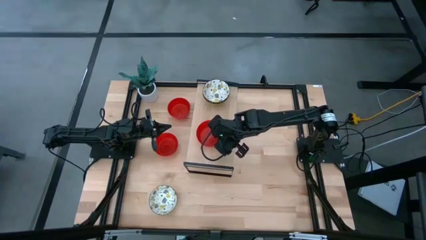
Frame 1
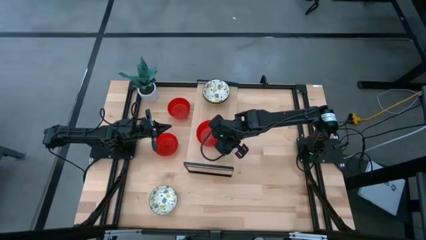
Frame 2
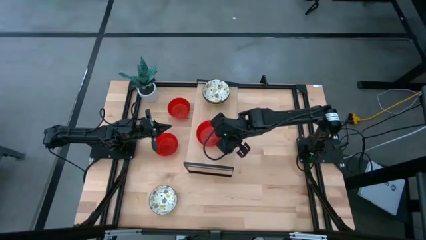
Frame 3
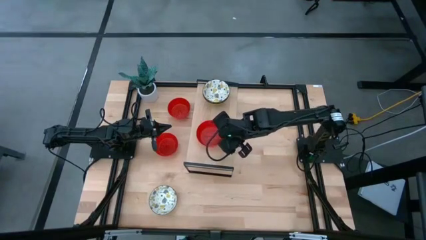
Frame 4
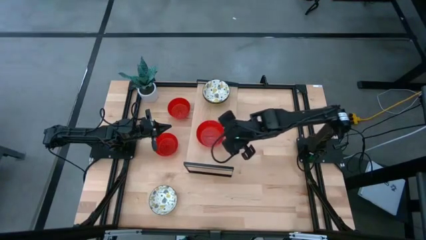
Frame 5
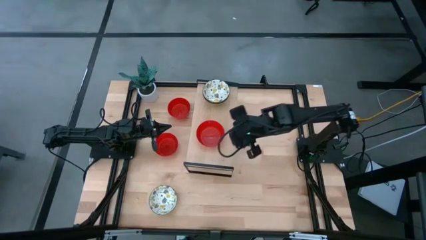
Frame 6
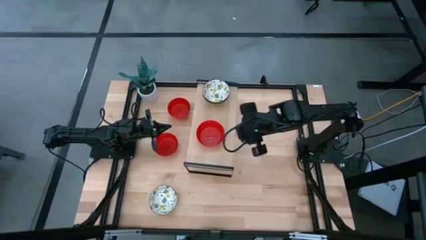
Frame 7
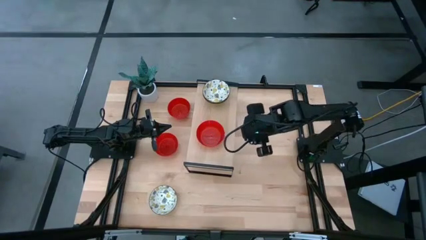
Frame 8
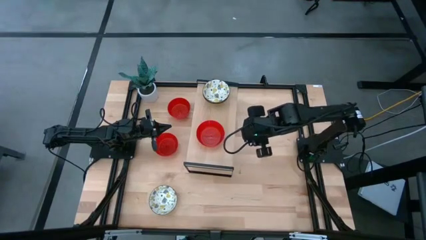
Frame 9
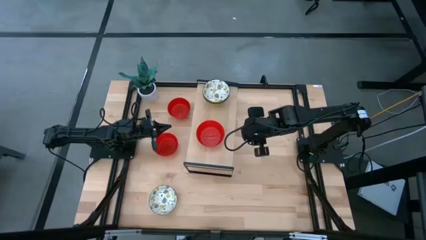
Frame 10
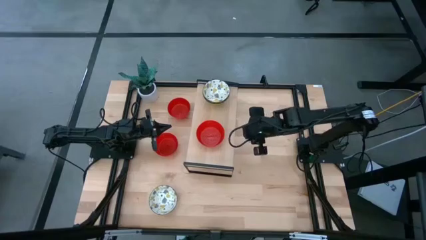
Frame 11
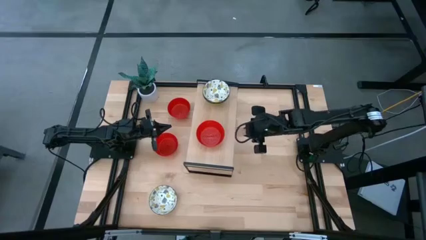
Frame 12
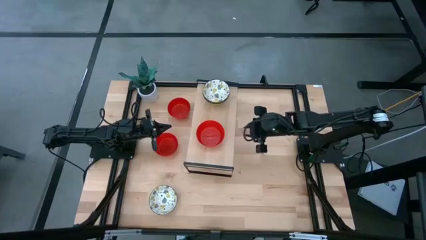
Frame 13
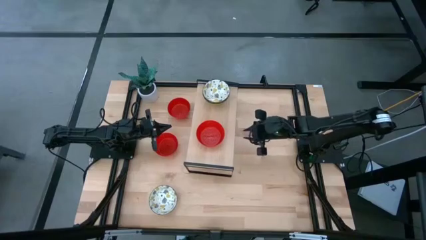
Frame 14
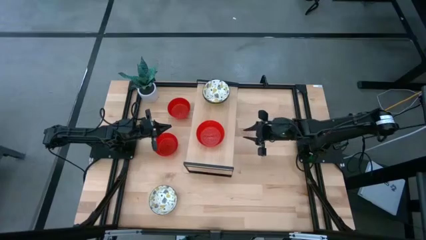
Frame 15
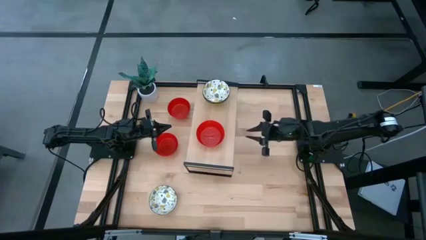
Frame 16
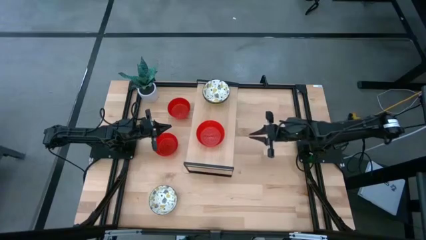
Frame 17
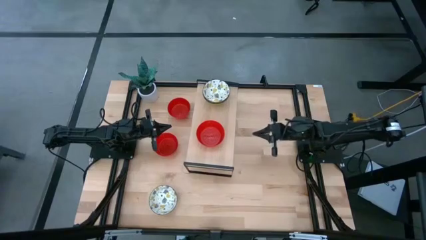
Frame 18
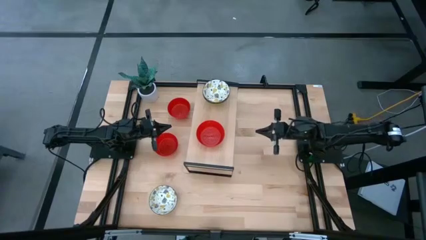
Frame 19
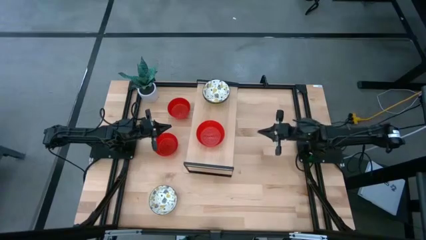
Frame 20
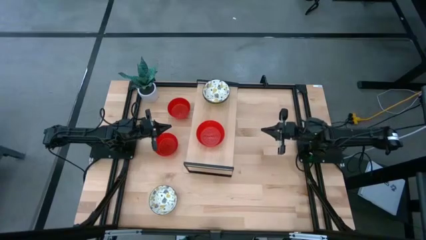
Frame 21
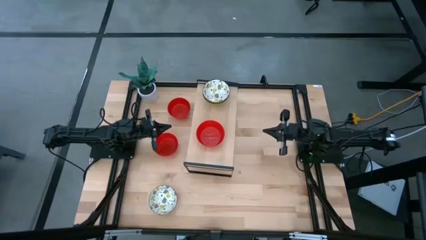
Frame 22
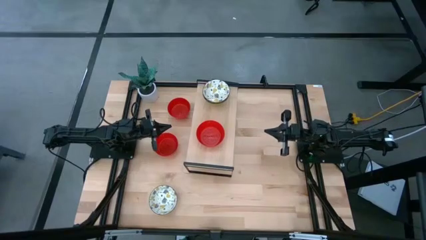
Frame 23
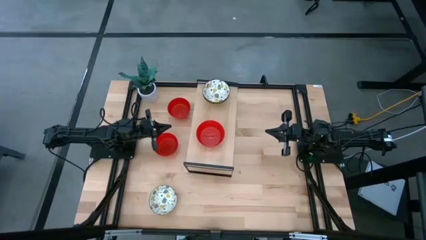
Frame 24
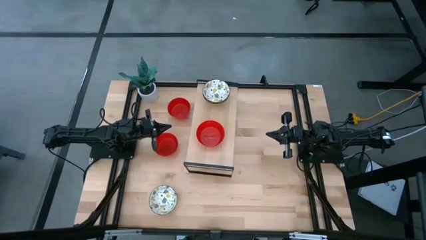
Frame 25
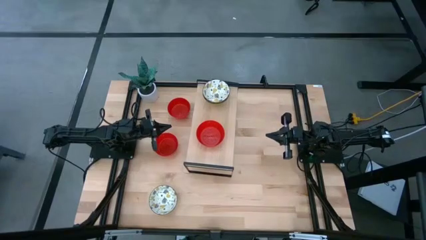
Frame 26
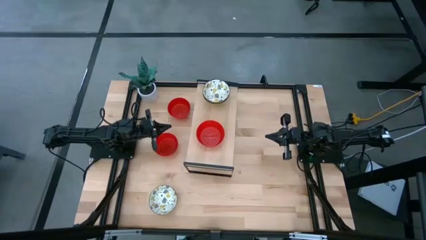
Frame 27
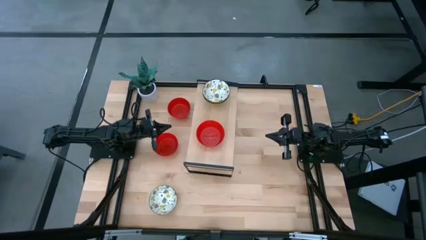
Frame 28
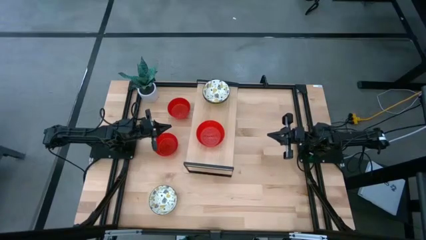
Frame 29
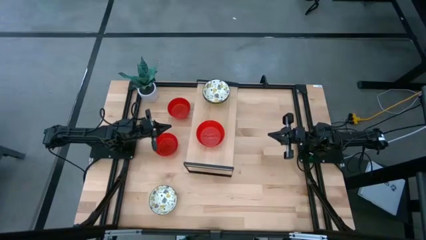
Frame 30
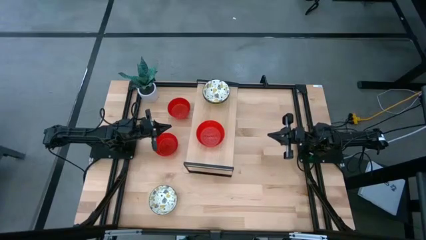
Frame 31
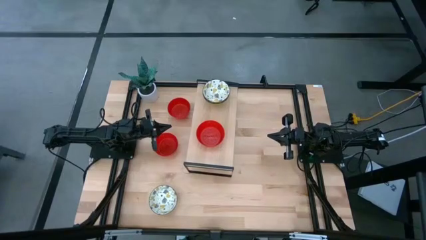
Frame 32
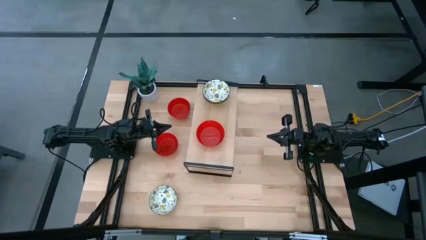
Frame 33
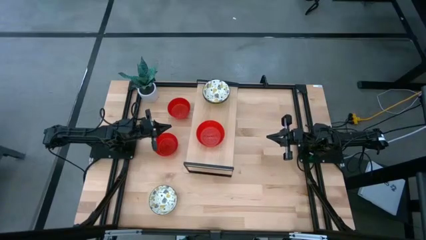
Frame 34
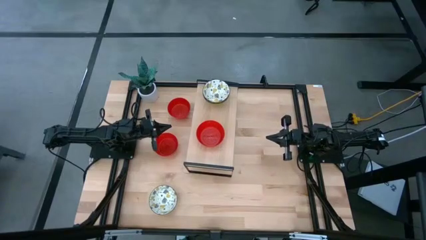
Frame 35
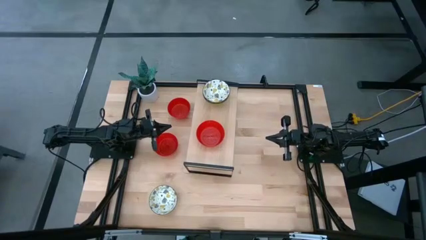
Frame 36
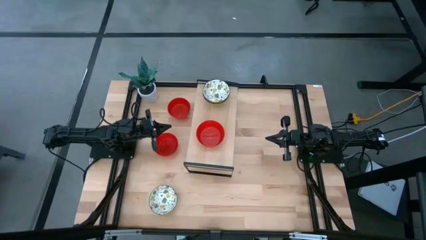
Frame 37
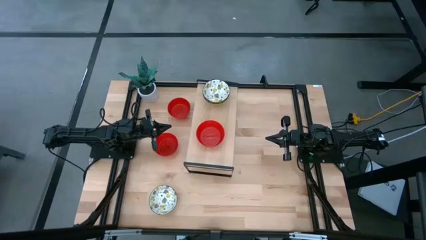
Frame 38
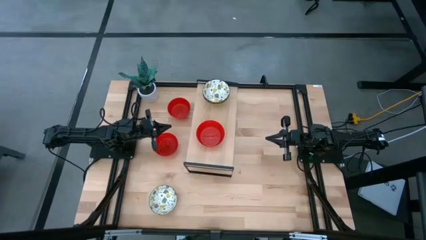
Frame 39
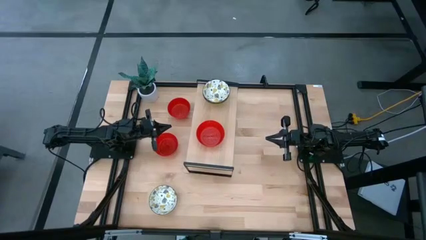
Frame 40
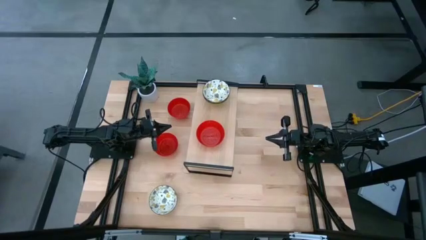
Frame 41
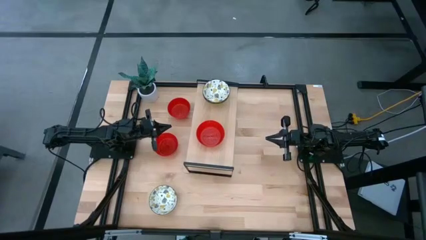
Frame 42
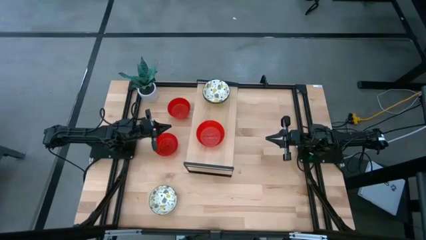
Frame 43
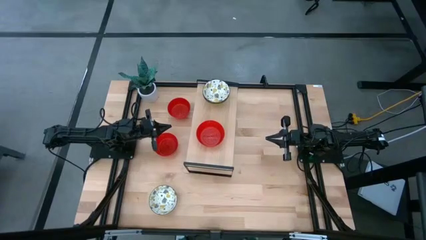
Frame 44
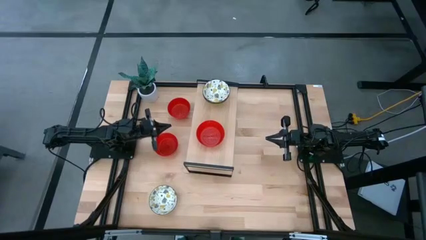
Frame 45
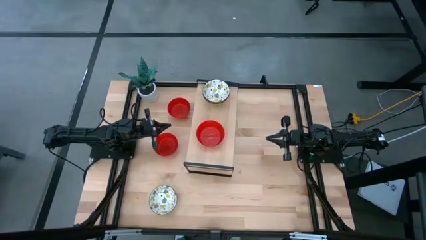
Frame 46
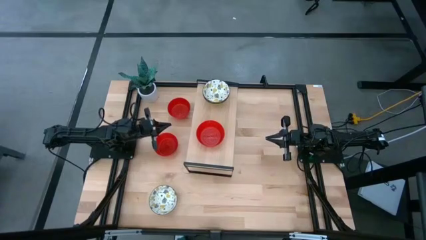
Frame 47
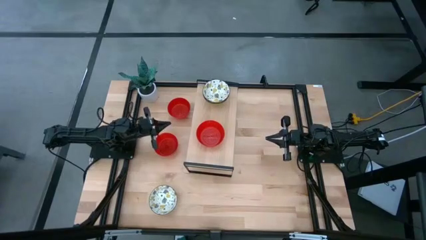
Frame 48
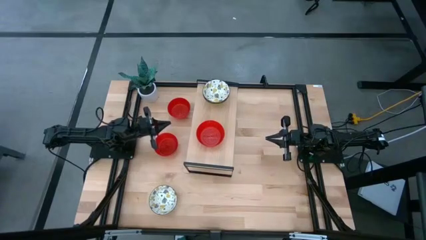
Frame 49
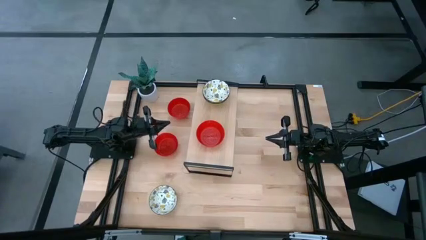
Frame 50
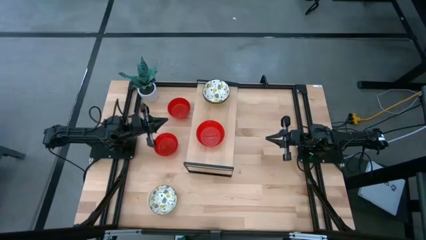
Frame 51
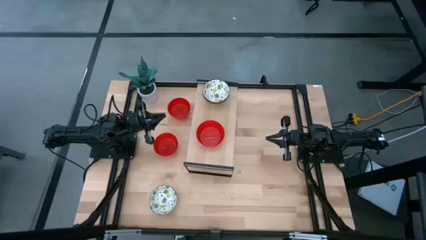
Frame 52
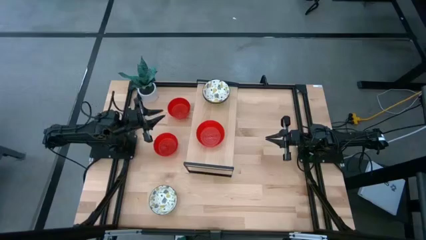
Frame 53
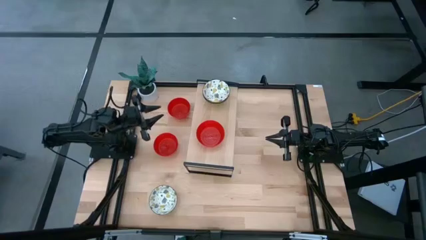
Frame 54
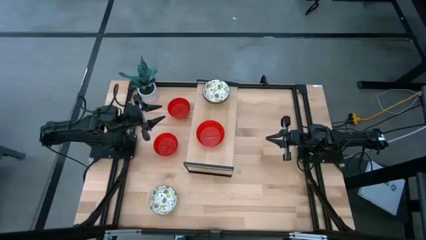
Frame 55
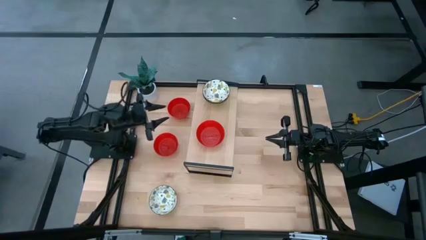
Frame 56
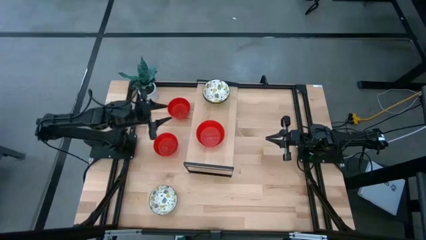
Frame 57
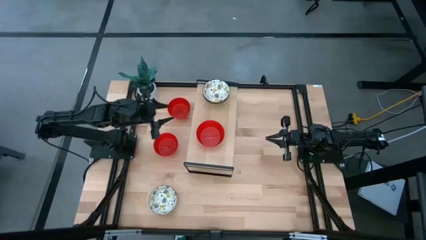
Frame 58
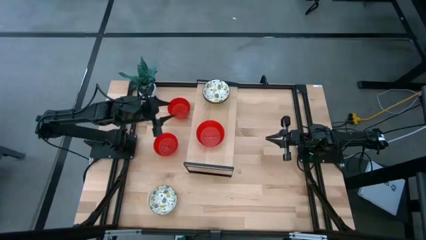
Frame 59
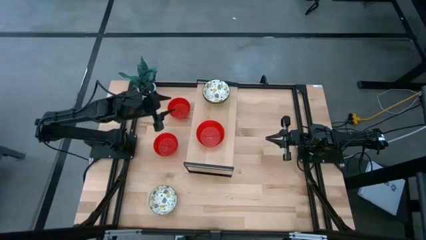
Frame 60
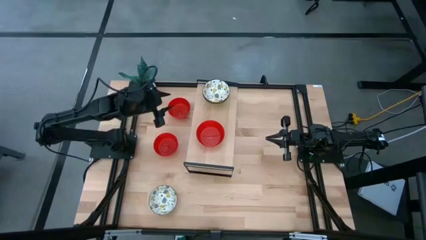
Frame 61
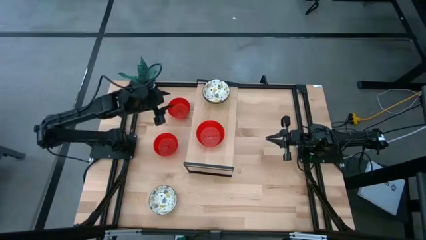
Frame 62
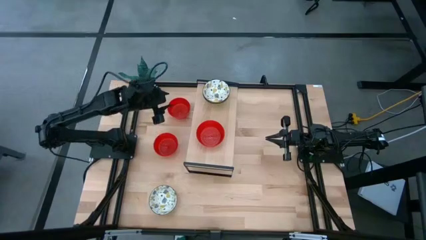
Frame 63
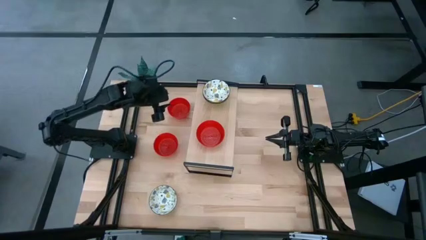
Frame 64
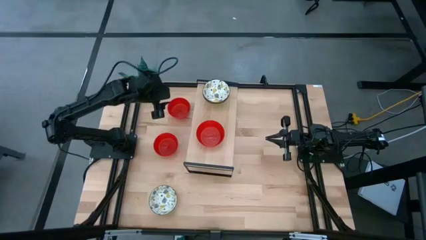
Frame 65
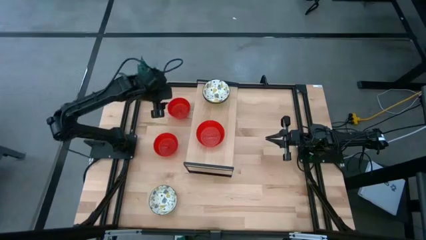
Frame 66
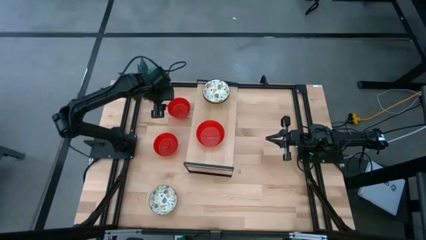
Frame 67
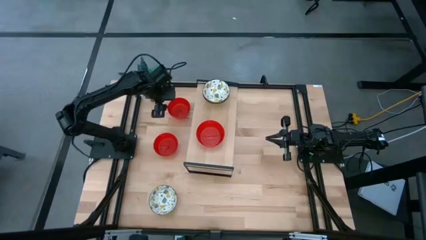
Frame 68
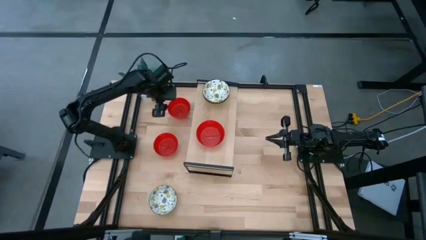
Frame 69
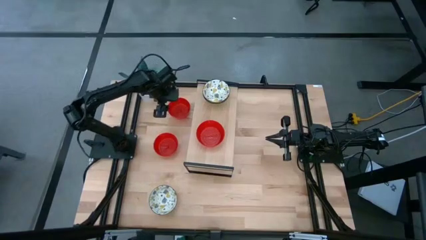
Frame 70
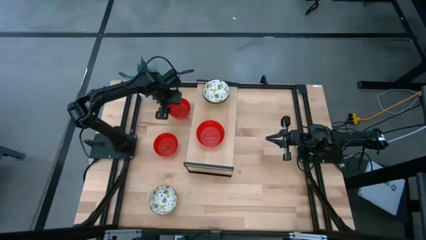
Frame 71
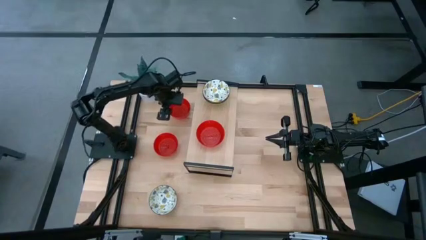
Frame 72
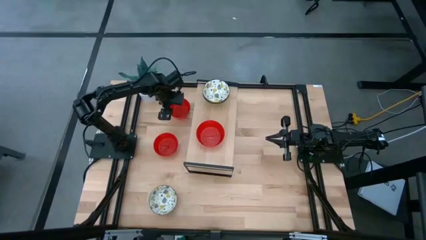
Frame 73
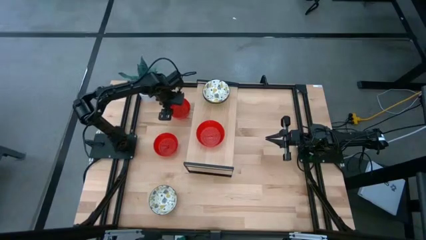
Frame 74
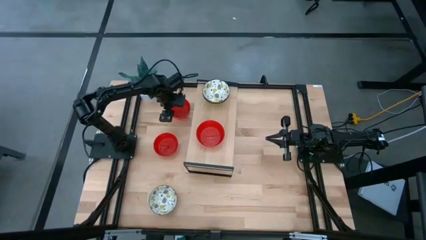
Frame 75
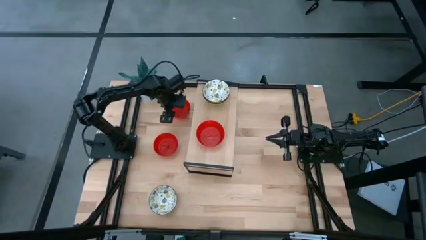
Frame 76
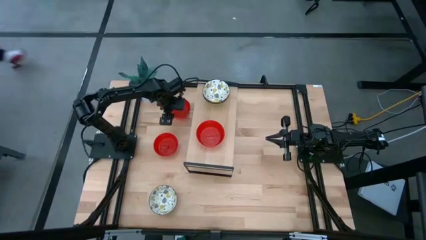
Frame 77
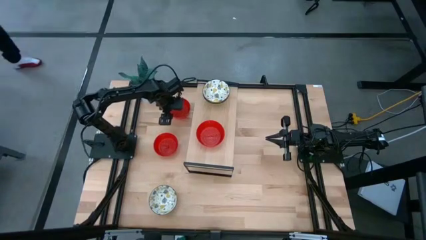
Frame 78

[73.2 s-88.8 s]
Task: Pick & Place Mini bowls
Stack the top red bowl on top of the red bowl on the shelf

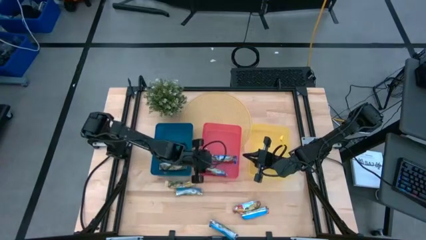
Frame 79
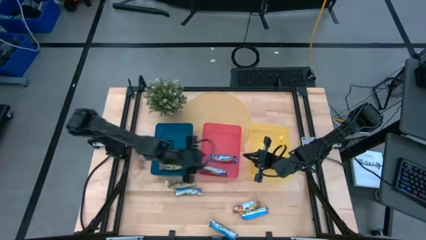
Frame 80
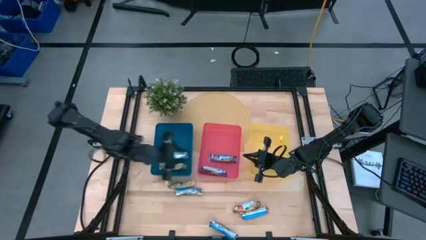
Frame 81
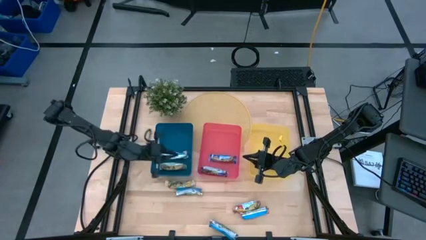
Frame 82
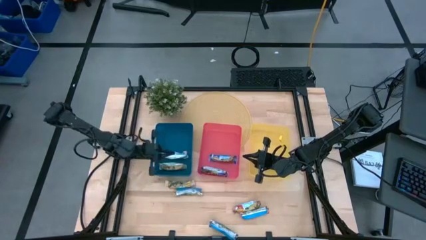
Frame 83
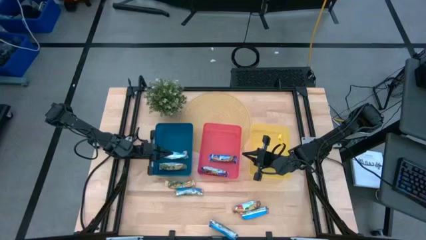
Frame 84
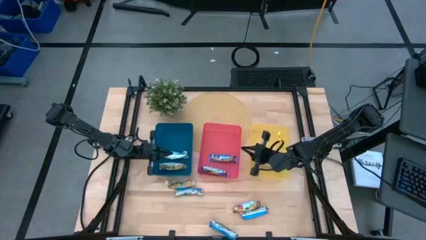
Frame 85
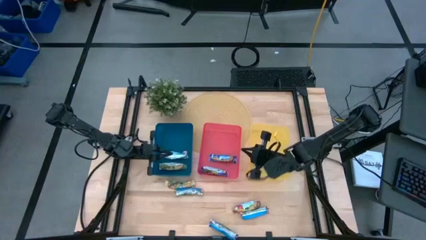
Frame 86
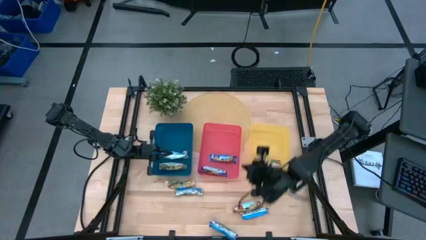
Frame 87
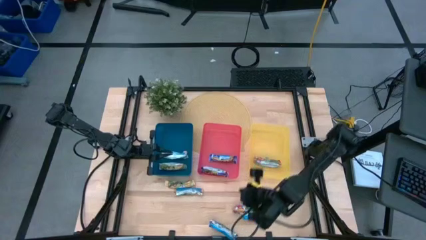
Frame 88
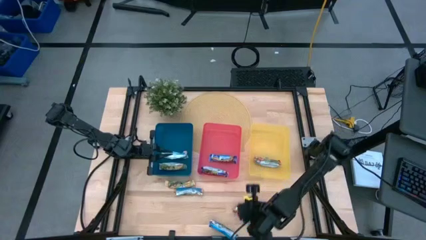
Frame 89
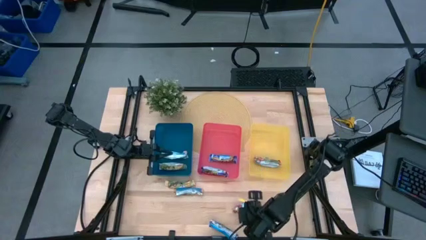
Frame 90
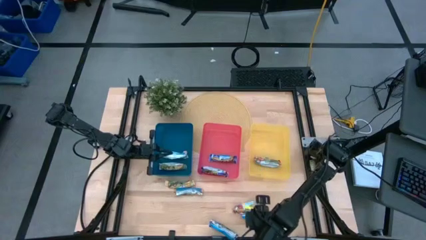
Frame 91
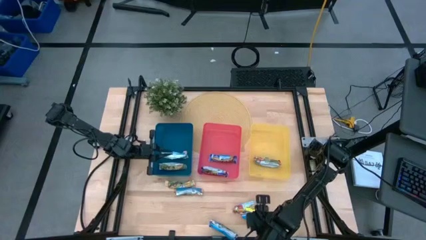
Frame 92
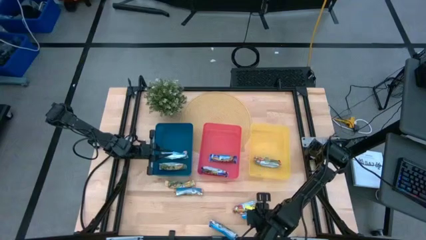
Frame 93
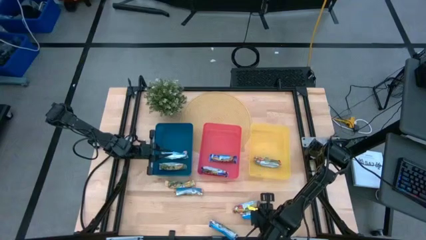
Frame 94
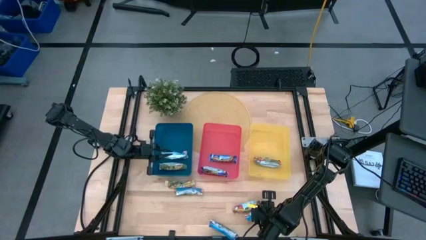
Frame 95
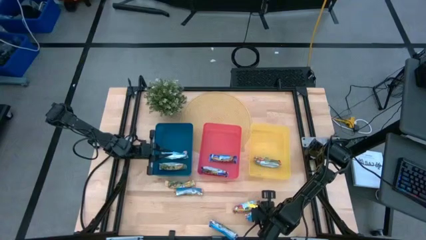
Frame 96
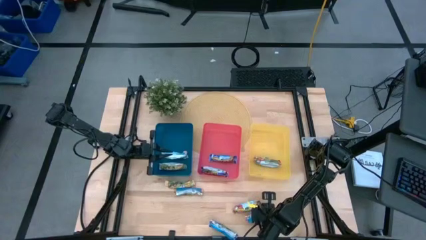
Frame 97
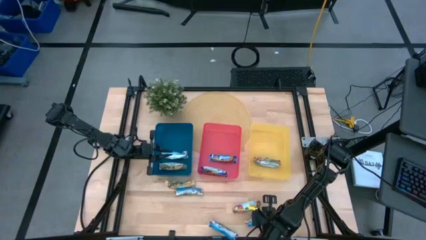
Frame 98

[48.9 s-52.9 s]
Task: Pick and place Granola Bars by type
Adjust the bottom red granola bar
